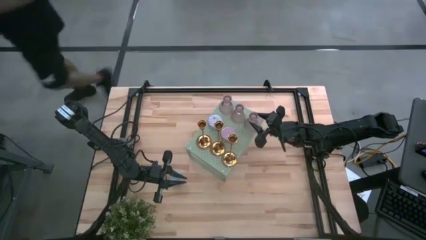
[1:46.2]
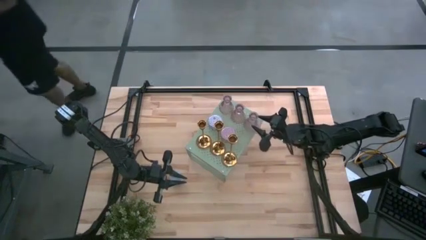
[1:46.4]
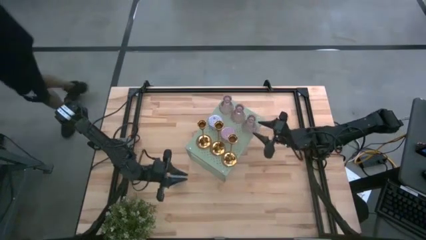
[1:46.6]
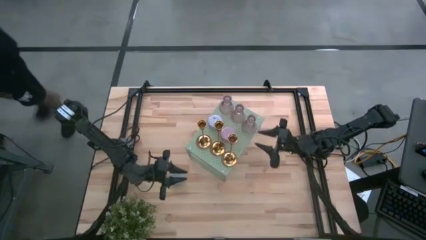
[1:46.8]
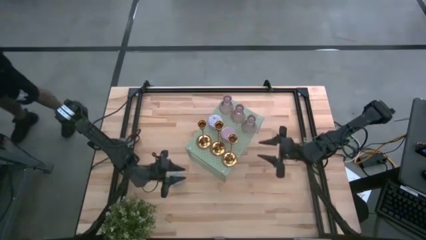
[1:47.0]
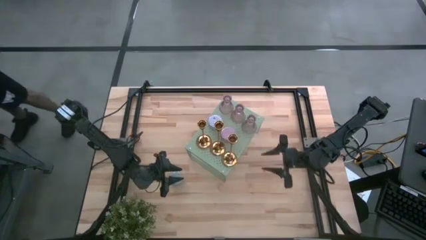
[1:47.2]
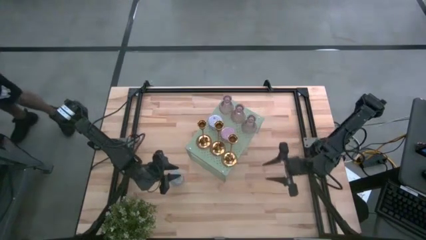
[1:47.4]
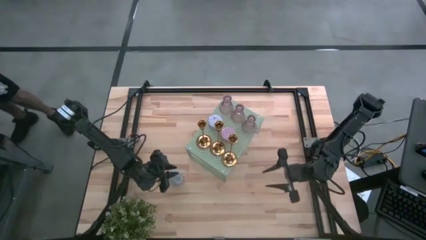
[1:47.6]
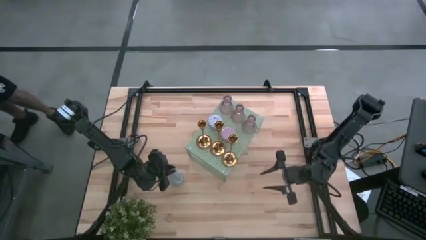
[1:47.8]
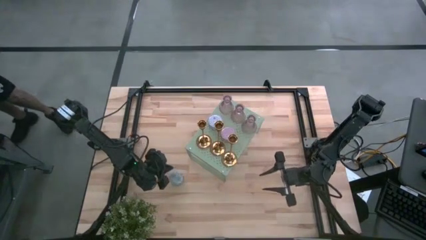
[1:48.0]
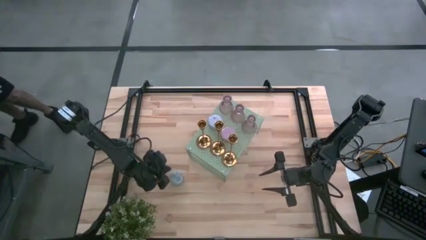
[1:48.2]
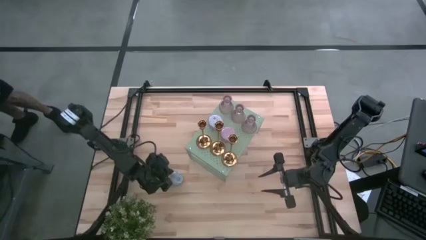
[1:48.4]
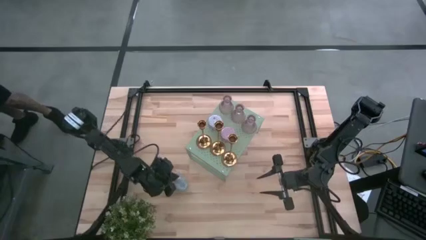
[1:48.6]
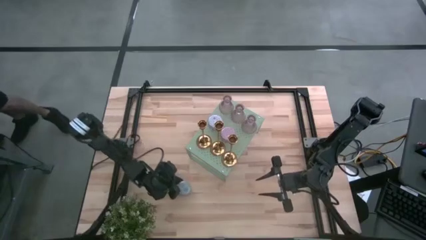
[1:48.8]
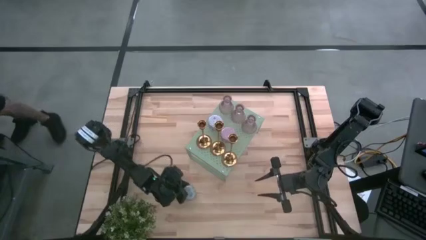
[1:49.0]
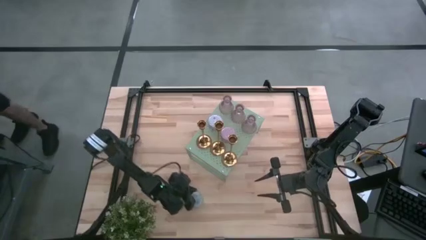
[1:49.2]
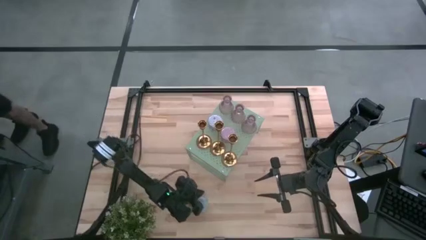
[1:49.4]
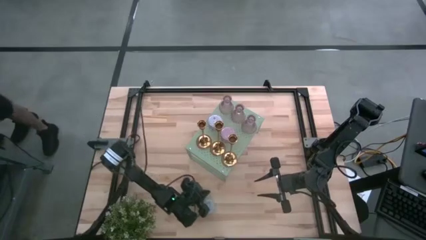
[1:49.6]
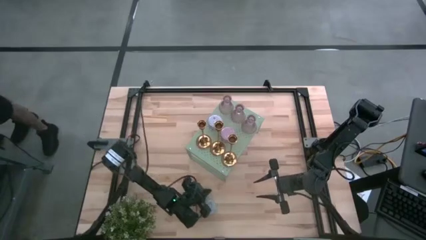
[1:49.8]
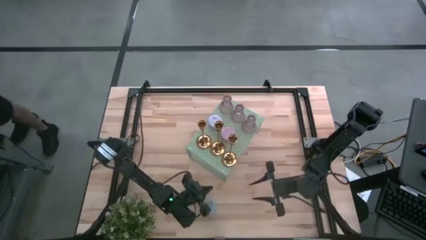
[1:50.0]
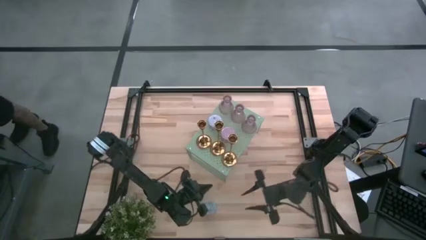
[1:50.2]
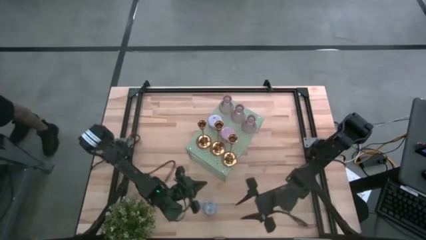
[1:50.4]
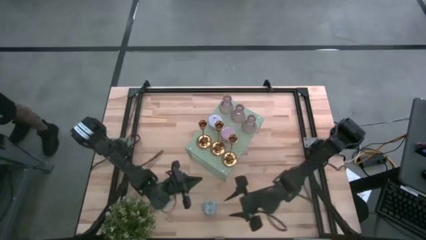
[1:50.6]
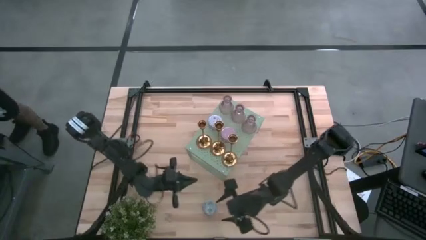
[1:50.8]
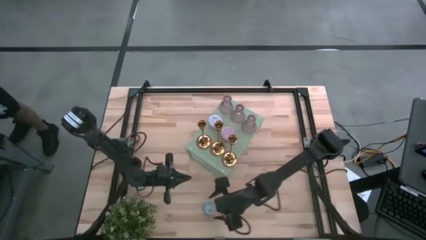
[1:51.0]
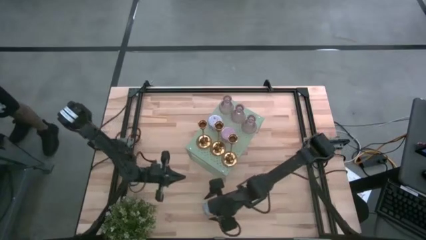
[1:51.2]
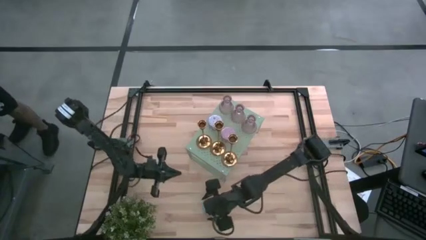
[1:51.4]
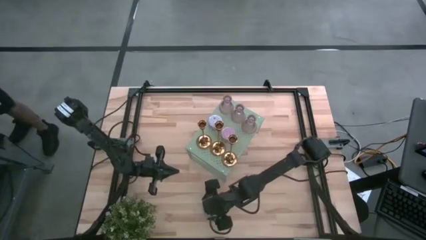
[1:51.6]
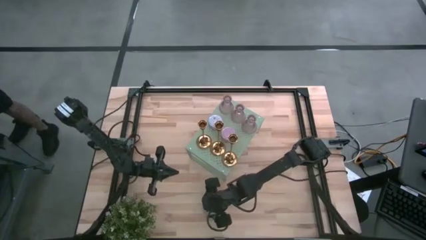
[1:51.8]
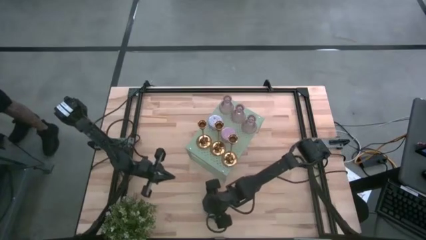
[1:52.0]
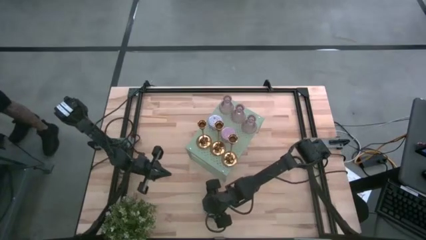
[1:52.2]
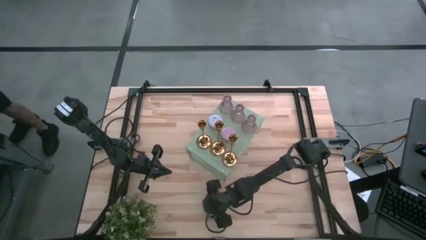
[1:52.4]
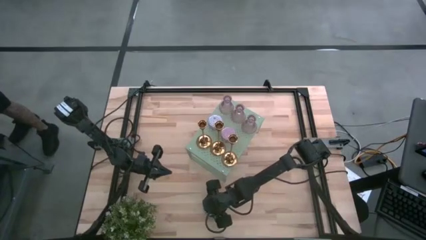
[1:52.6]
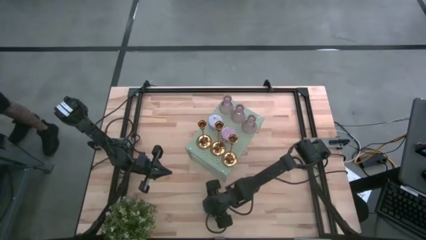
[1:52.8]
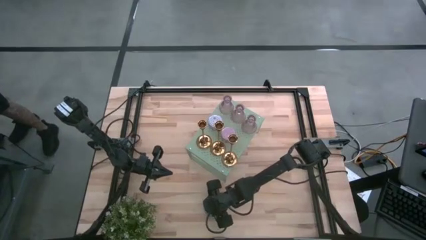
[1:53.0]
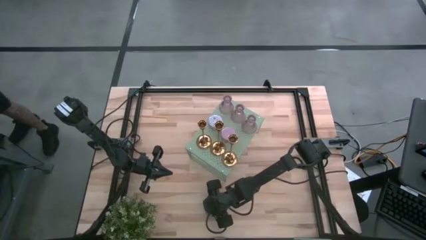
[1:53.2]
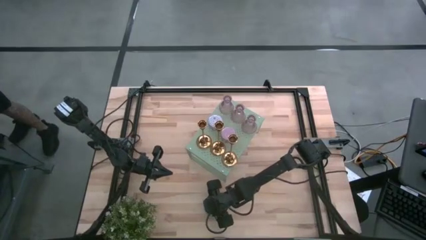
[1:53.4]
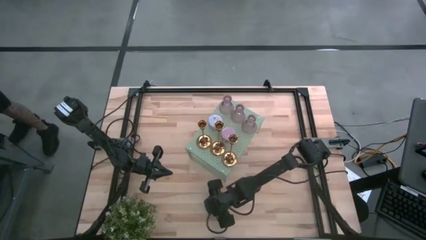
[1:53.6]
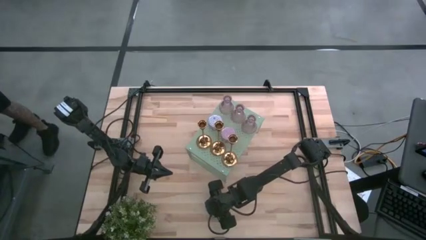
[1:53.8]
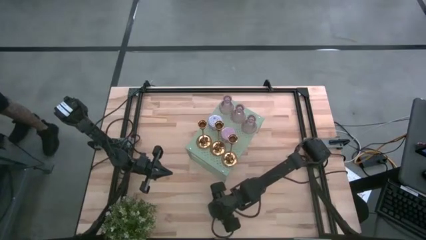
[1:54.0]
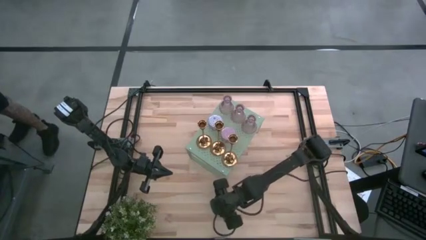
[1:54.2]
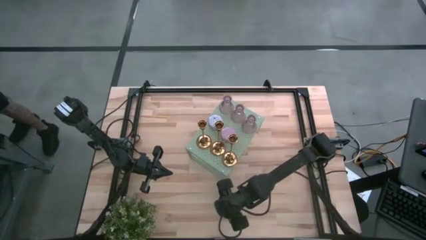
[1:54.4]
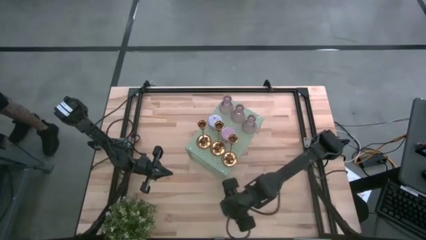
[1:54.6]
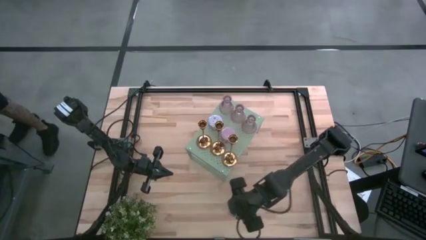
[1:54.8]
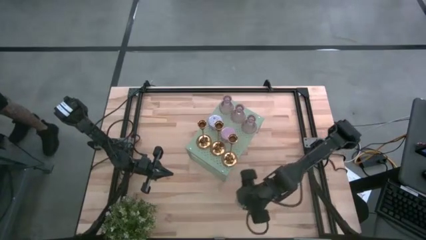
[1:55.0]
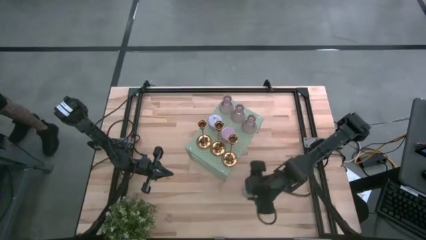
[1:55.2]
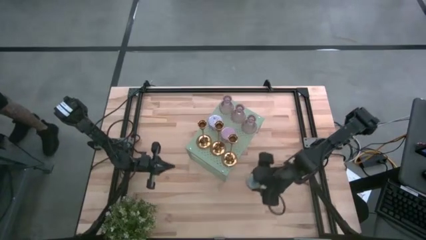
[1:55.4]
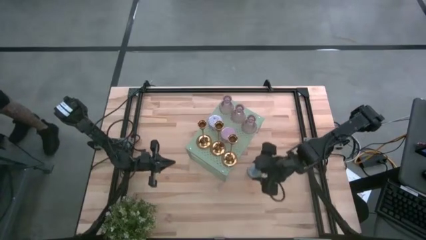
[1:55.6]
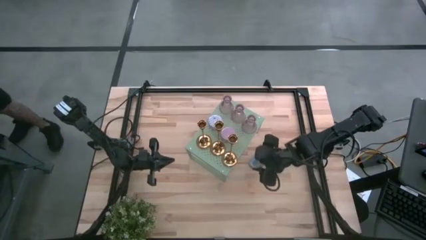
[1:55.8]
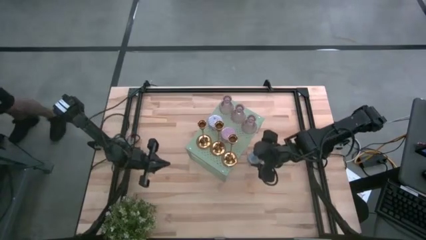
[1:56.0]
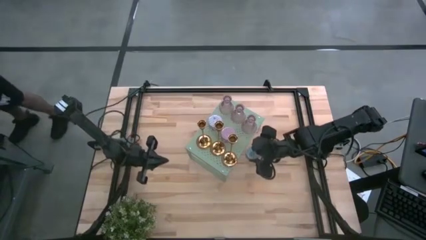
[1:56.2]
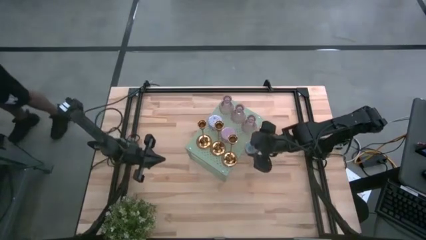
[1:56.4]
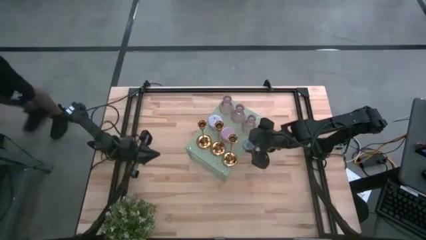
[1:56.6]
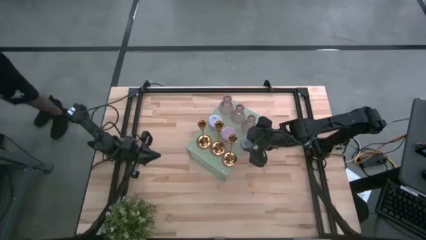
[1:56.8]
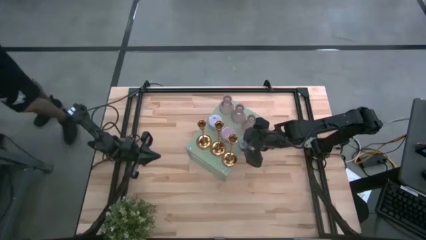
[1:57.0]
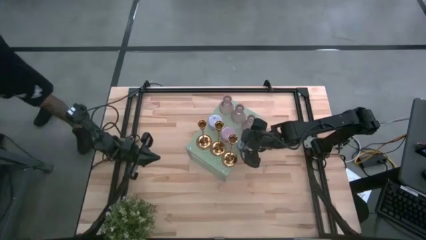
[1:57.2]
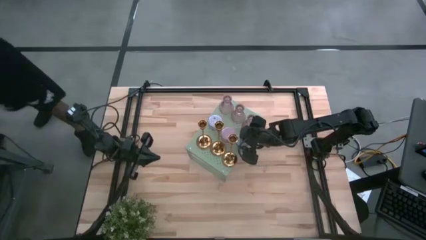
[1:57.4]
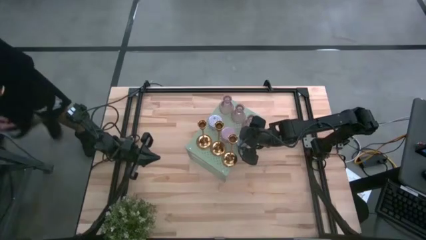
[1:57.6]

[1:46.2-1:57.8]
Task: Pick & Place candle stick holders
Put the blue scented candle aligned with the other scented candles on the shelf

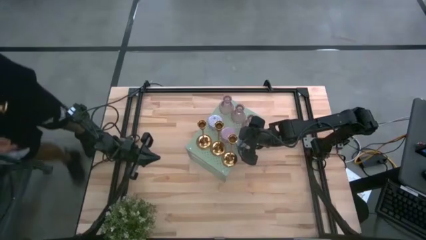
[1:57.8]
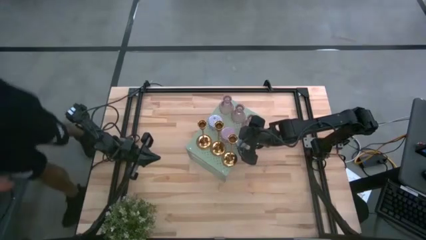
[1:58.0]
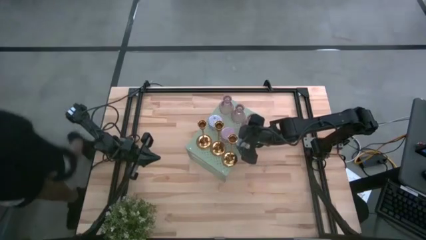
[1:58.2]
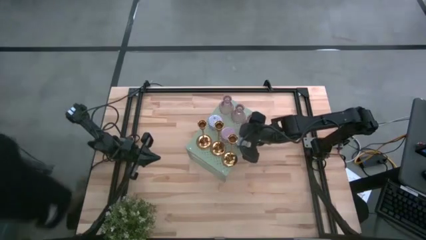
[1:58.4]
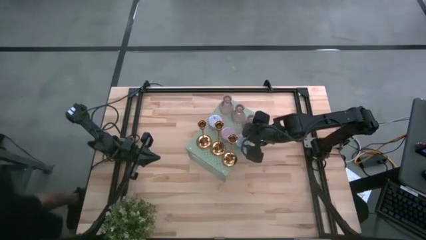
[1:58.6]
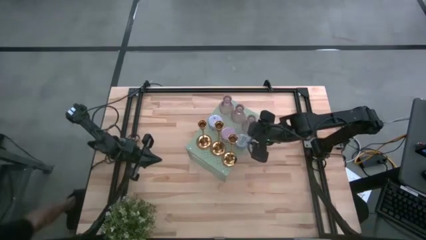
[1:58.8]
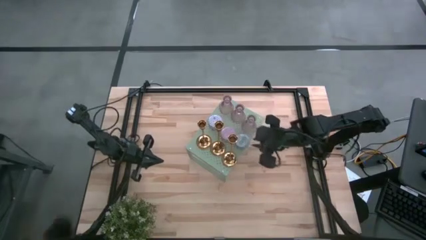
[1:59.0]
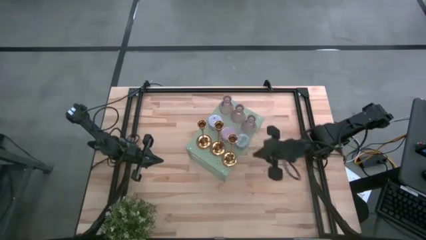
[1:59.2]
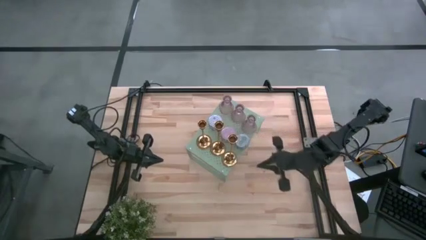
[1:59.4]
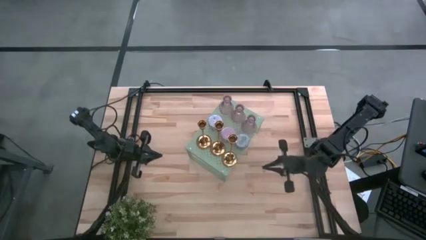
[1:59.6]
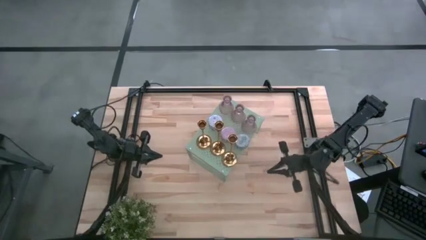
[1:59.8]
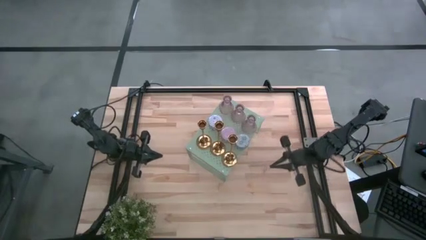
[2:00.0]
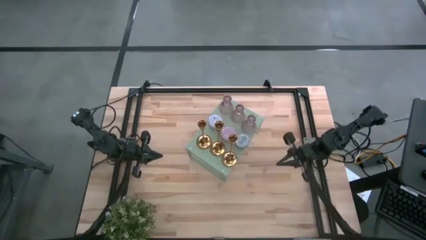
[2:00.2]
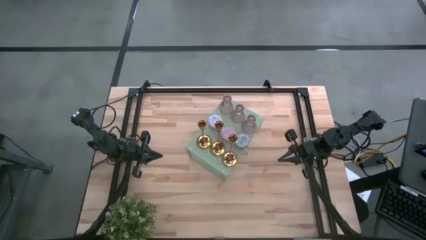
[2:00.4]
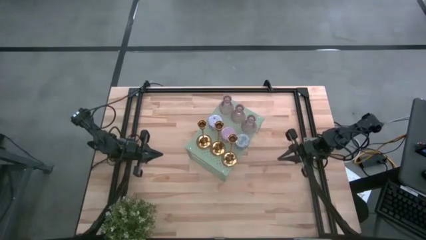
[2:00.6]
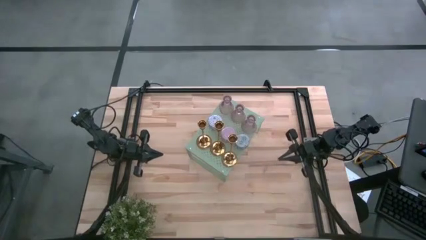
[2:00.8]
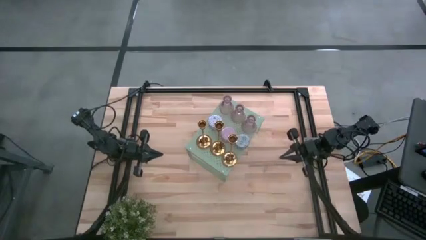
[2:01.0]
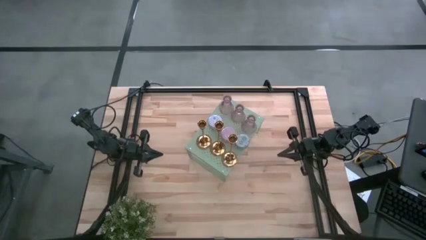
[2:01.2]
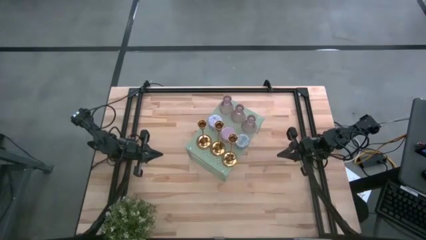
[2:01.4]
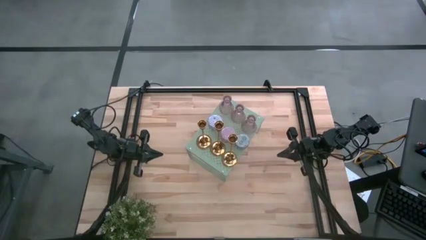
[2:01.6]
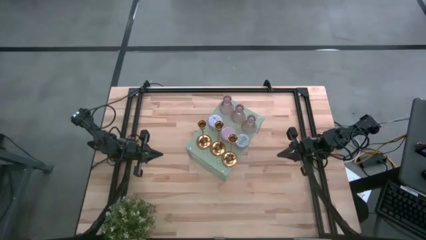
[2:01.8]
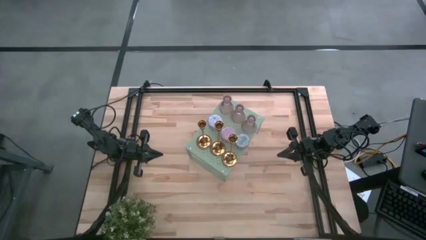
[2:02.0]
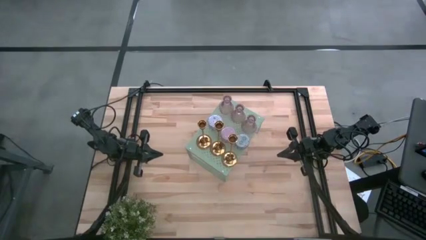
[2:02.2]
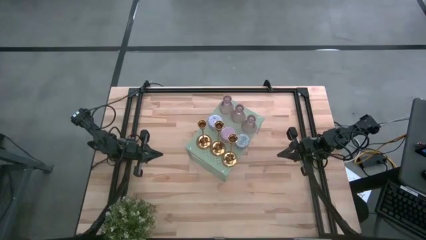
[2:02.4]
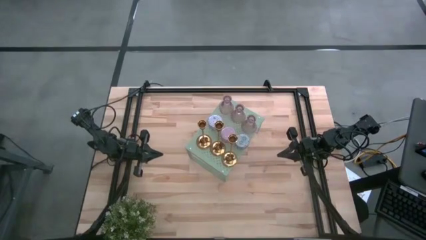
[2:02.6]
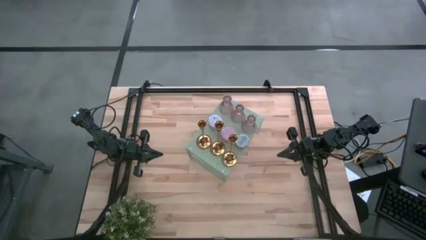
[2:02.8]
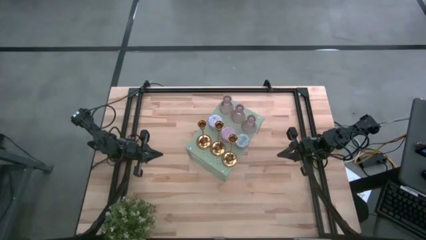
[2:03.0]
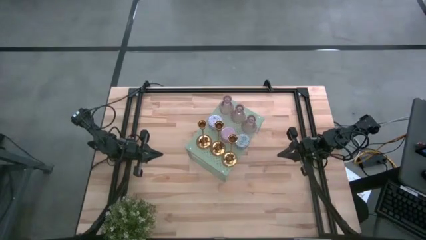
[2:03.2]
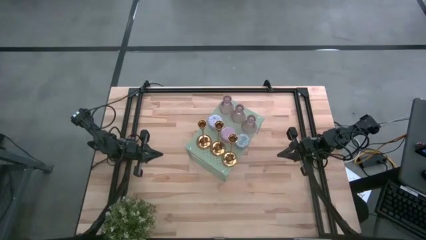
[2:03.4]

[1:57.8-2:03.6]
Return to Home Position
